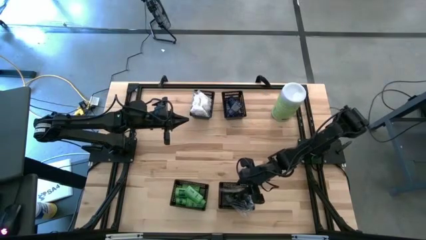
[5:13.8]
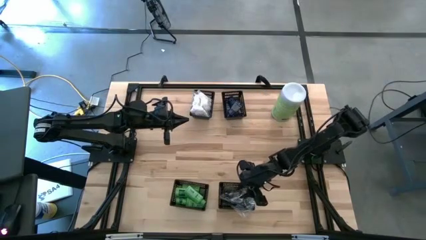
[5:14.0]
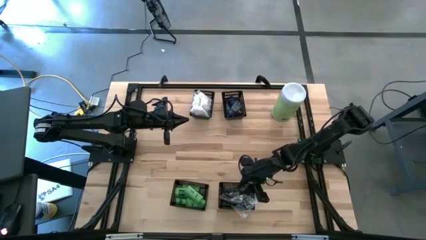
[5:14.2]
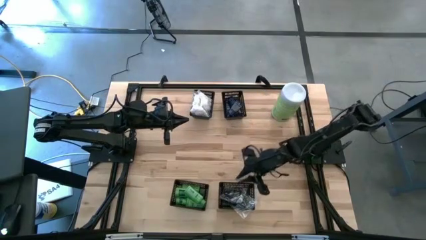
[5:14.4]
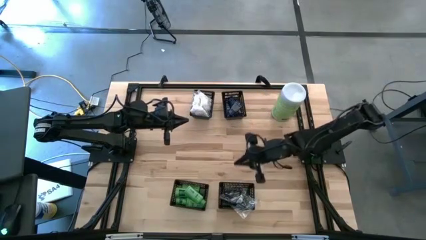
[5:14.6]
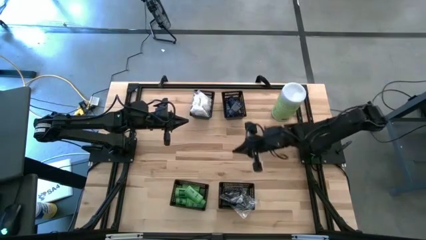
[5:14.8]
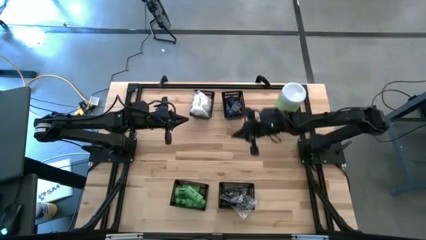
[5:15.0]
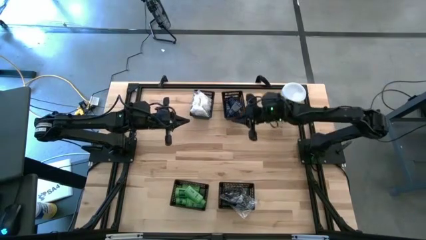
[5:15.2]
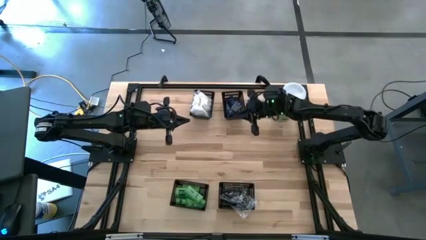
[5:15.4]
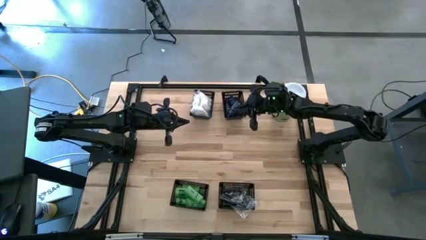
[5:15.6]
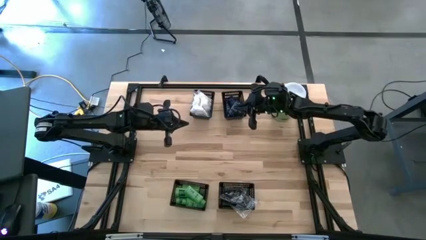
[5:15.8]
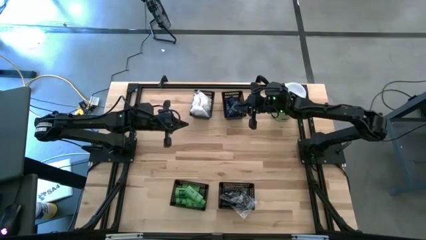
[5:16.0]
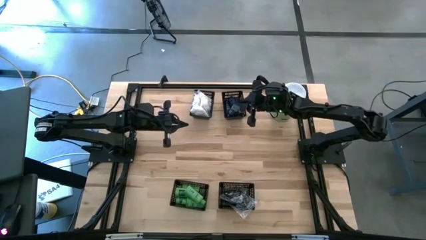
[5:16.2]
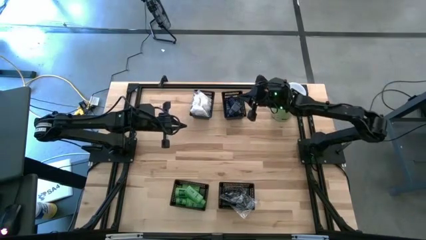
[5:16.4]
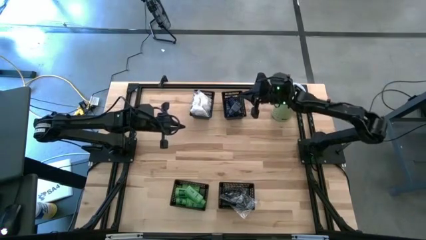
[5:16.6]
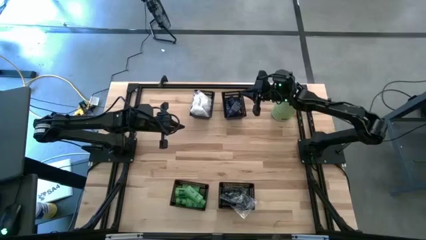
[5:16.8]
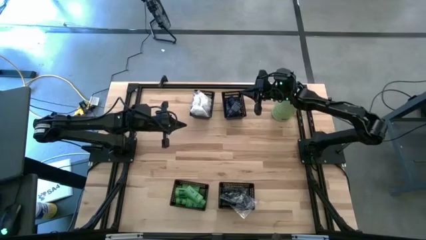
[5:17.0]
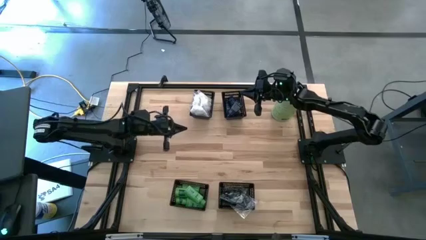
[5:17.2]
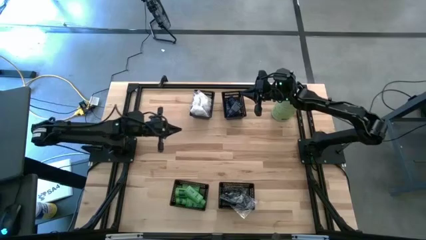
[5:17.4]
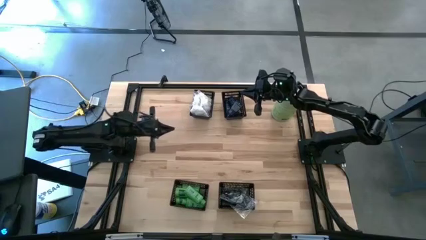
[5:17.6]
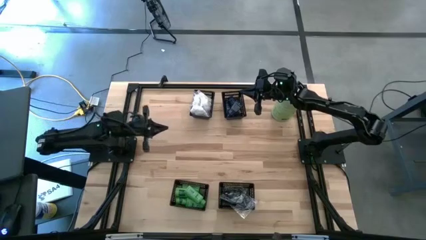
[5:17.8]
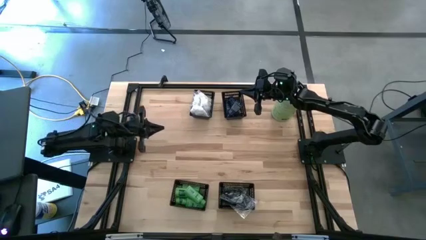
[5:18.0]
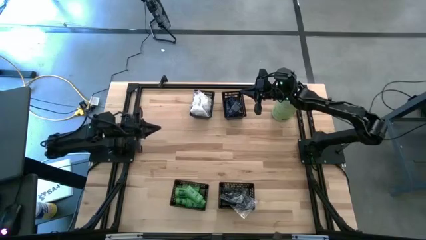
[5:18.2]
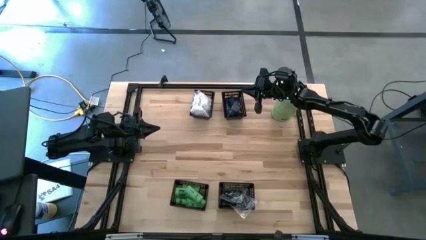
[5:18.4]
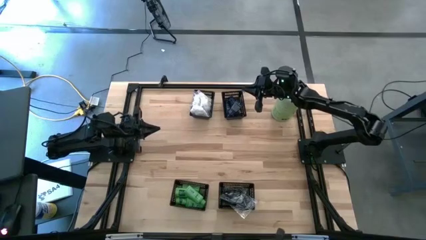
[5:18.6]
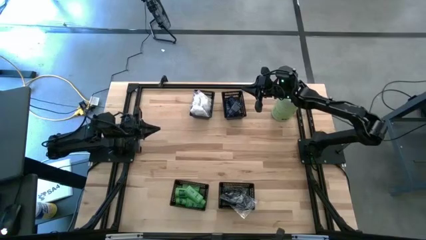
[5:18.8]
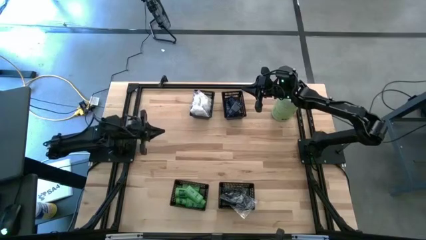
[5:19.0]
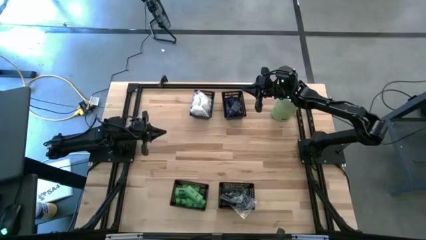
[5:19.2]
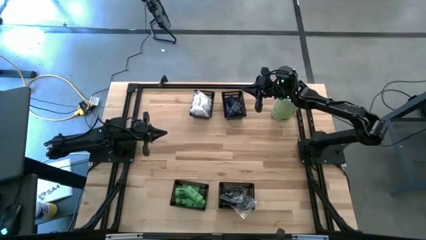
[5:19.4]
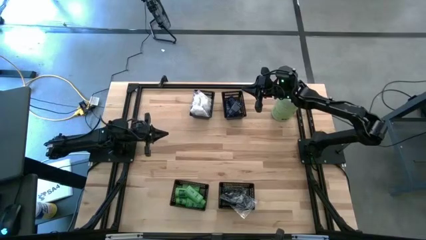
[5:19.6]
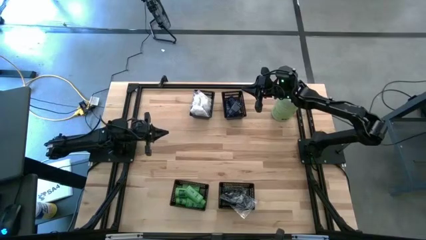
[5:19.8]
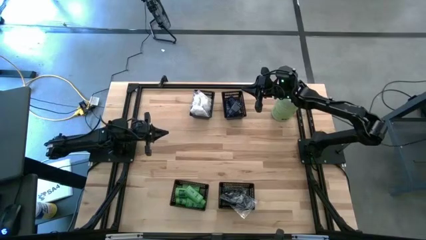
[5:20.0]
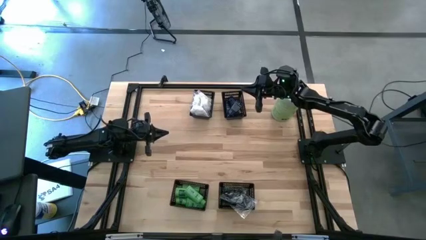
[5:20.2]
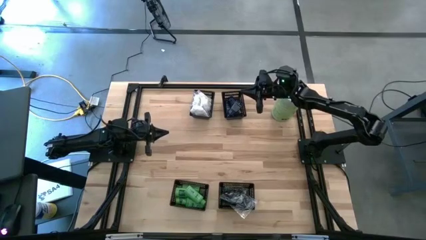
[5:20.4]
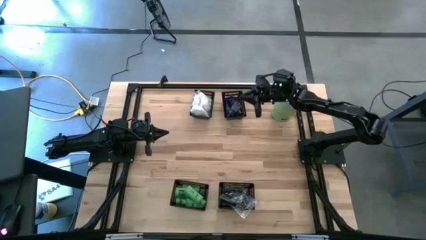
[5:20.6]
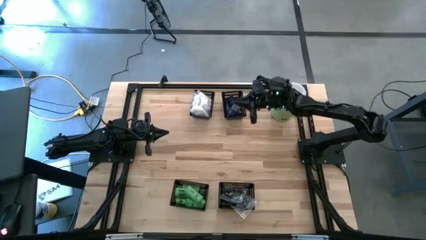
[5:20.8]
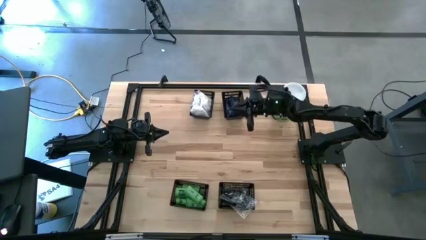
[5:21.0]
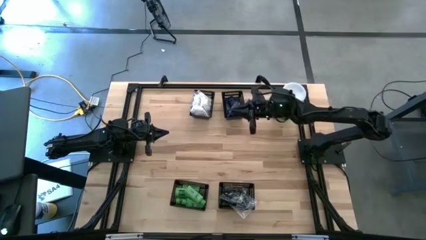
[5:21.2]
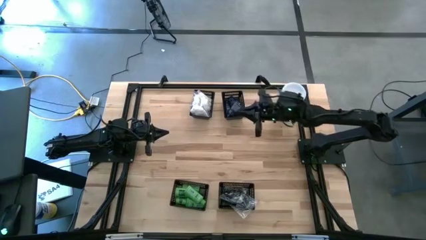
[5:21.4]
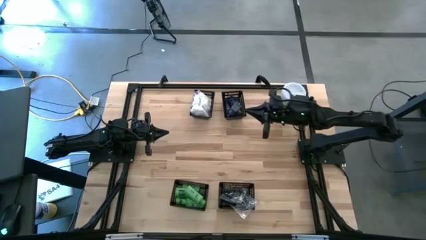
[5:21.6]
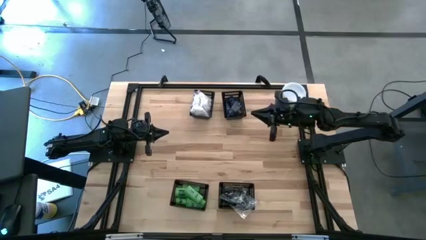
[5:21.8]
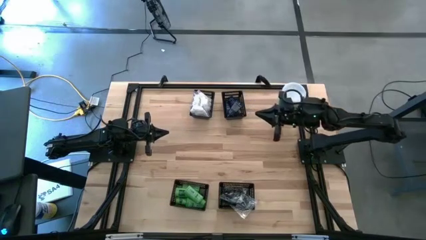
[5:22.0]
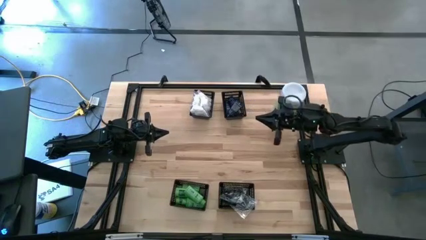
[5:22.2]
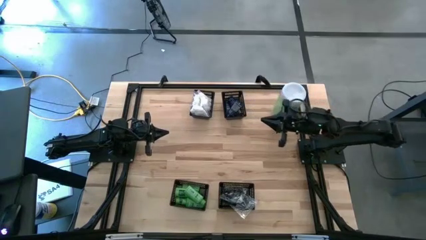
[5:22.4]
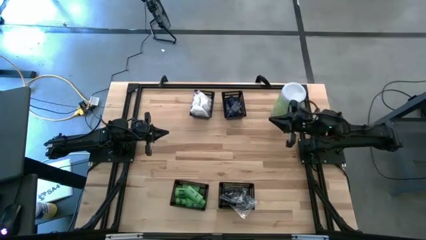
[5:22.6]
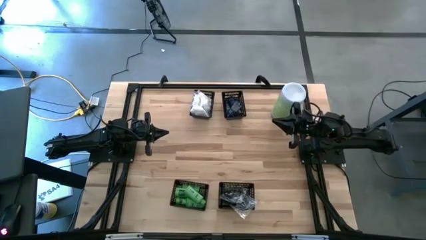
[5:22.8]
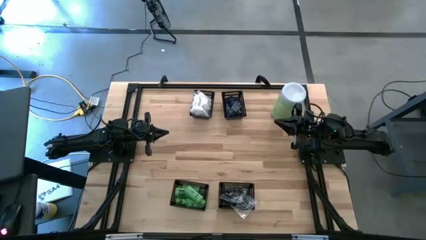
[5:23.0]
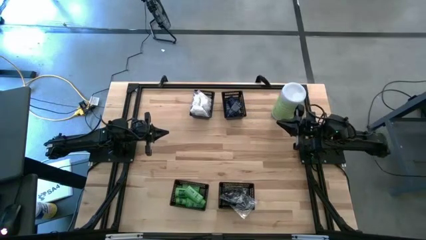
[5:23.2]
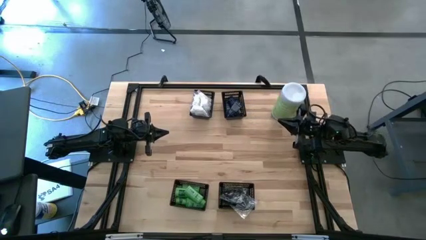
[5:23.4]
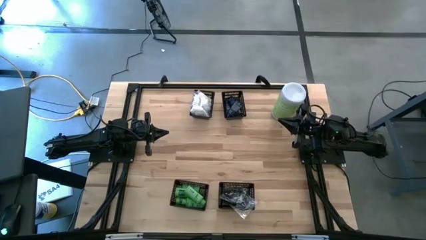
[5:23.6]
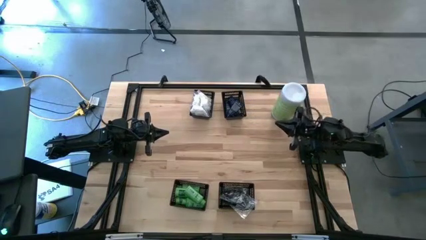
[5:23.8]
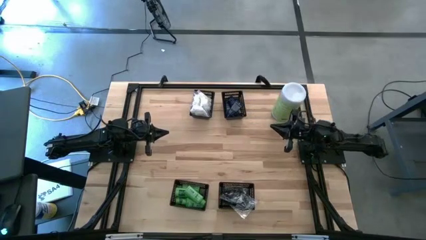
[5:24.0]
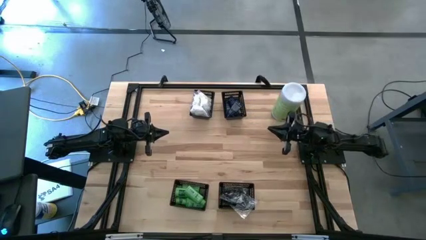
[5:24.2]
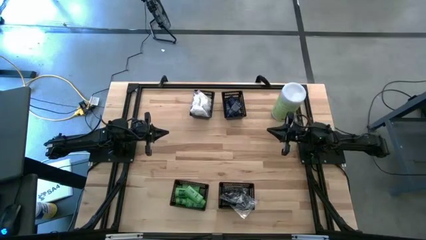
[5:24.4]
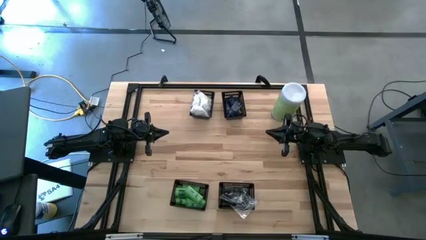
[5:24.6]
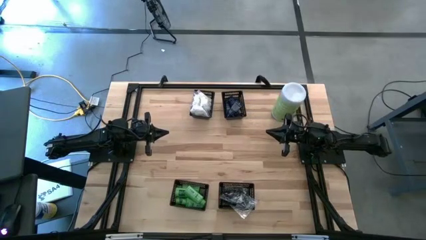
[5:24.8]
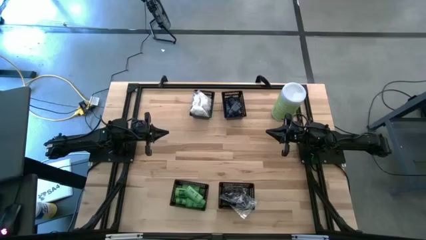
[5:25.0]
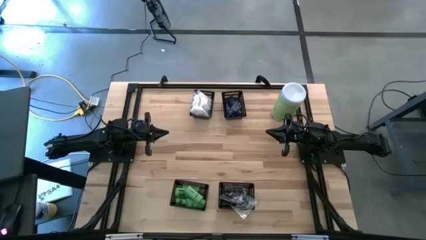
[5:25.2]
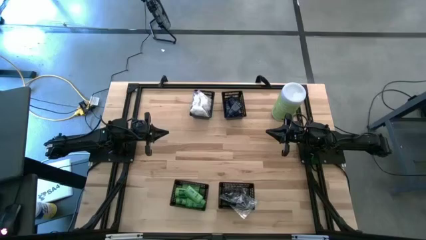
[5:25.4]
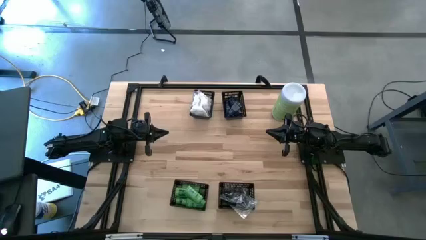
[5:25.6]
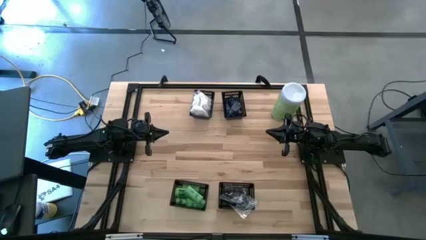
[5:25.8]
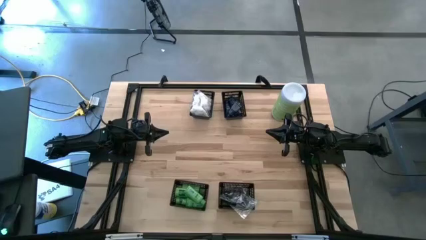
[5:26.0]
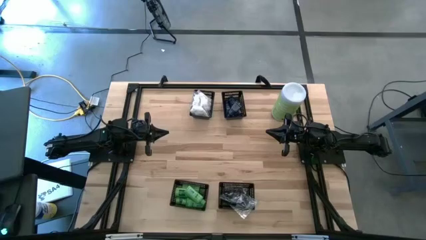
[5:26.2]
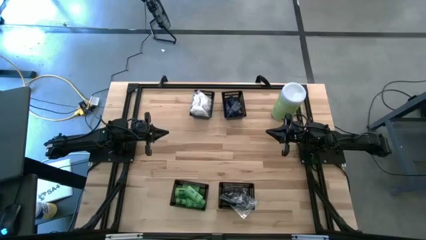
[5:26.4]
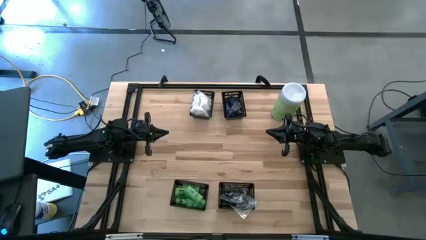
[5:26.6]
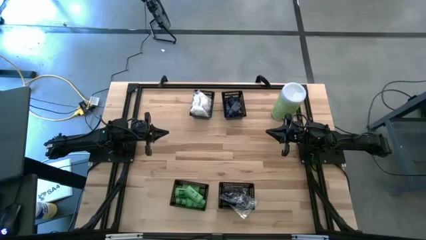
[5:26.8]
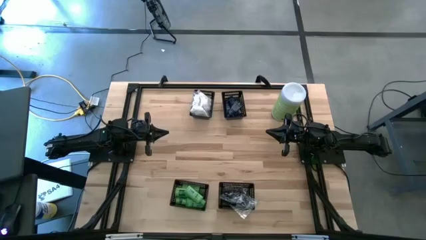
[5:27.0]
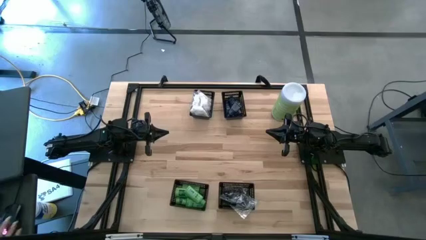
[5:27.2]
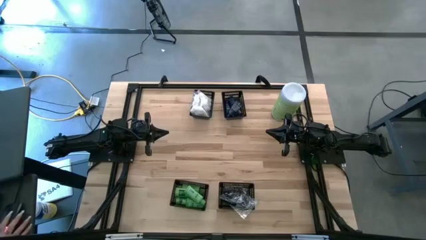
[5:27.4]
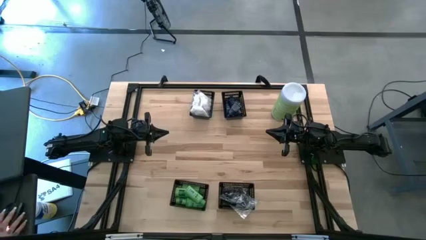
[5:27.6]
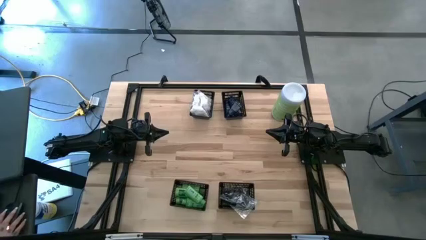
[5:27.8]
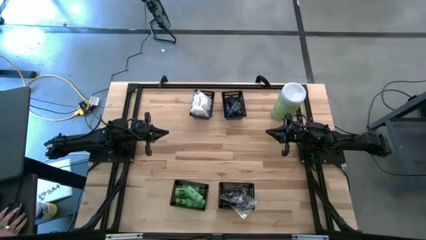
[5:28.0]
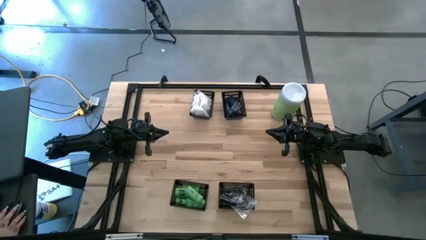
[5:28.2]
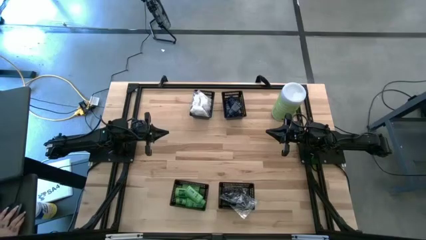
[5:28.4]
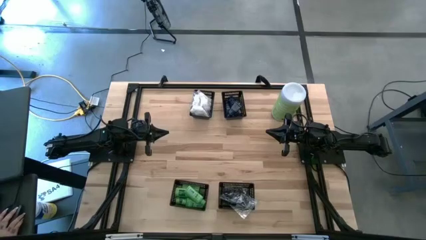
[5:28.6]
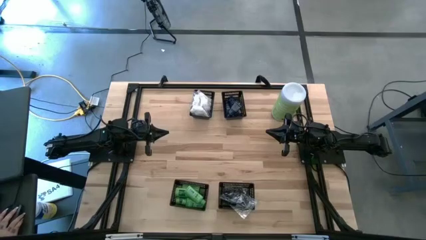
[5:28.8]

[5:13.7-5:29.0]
Task: Pick & Place Travel size toiletries
Return to Home Position
